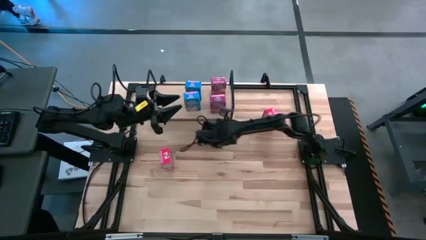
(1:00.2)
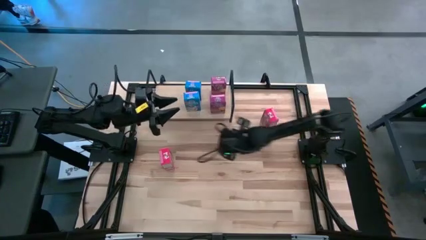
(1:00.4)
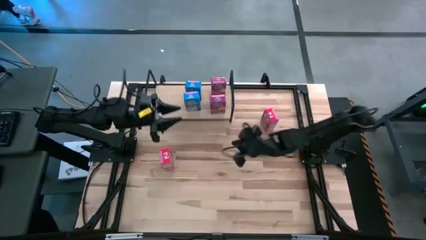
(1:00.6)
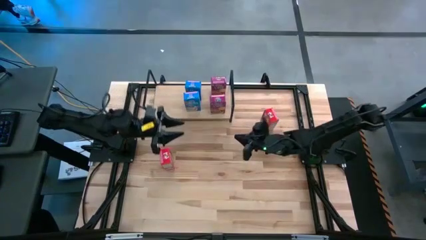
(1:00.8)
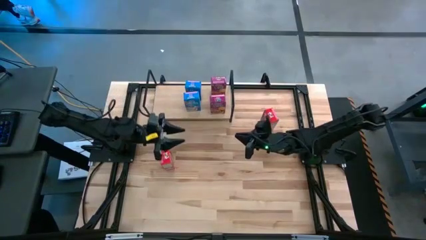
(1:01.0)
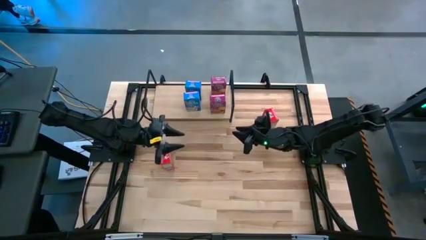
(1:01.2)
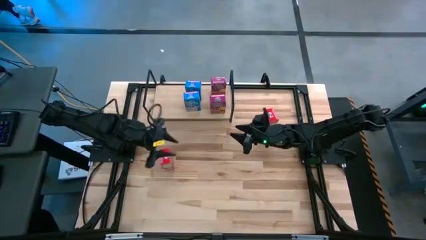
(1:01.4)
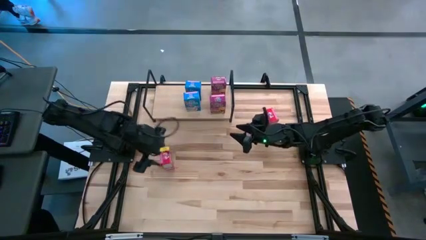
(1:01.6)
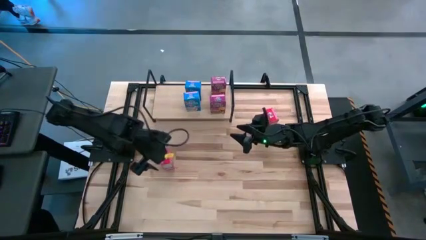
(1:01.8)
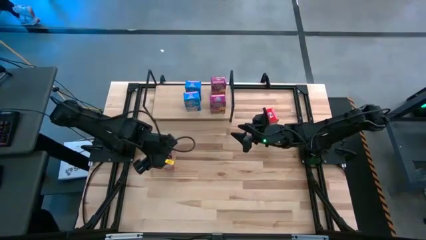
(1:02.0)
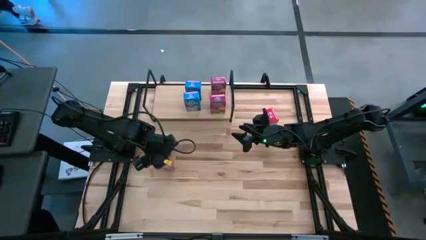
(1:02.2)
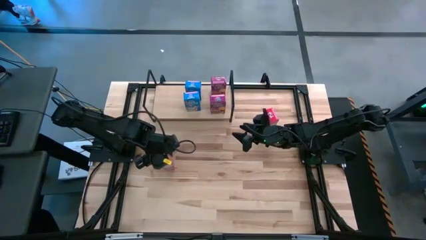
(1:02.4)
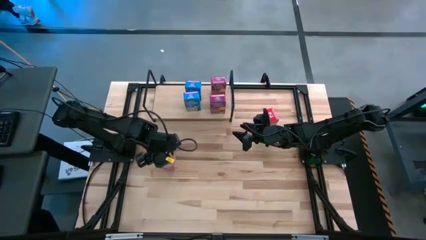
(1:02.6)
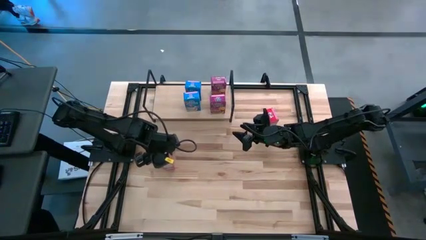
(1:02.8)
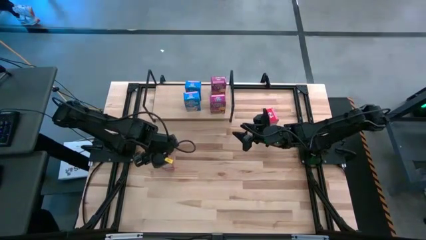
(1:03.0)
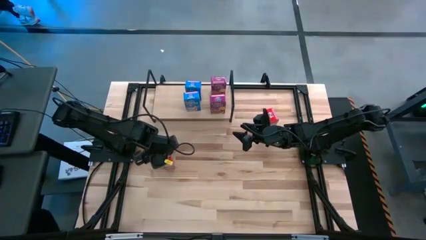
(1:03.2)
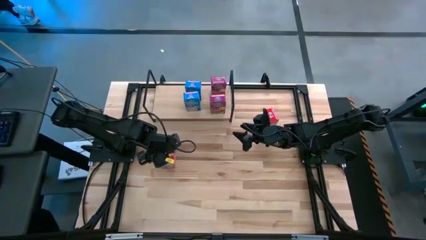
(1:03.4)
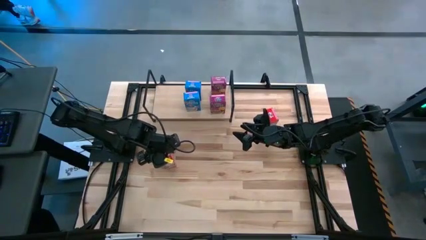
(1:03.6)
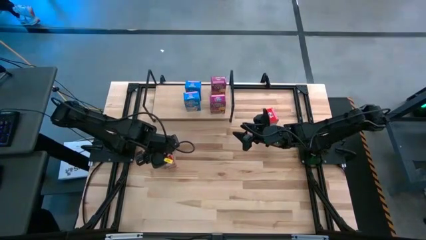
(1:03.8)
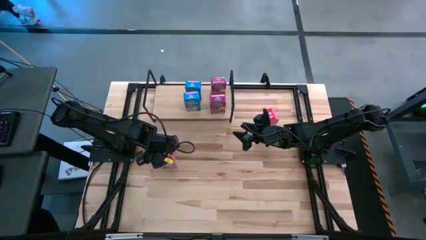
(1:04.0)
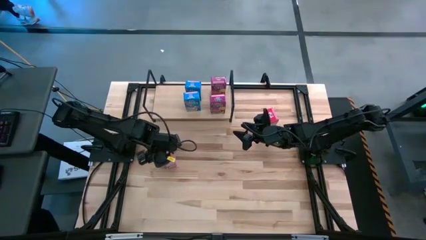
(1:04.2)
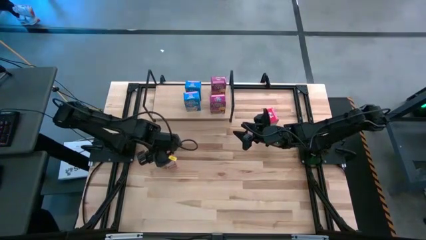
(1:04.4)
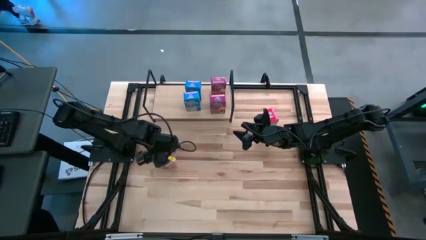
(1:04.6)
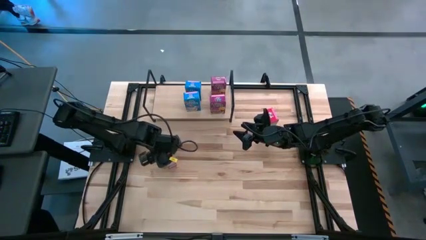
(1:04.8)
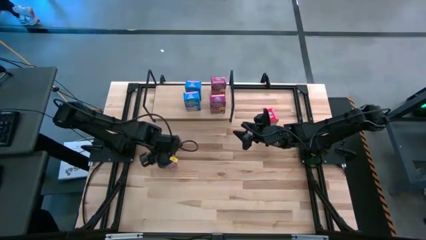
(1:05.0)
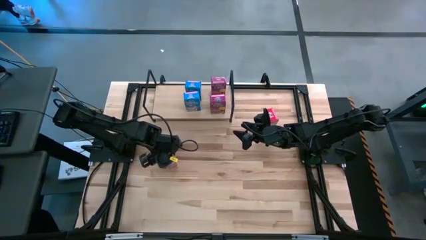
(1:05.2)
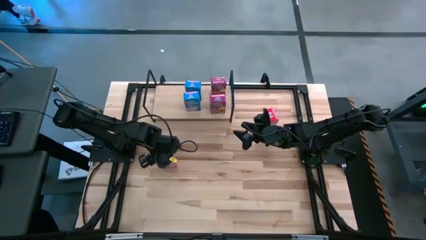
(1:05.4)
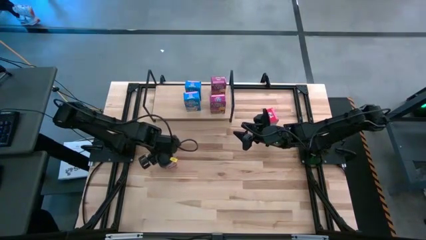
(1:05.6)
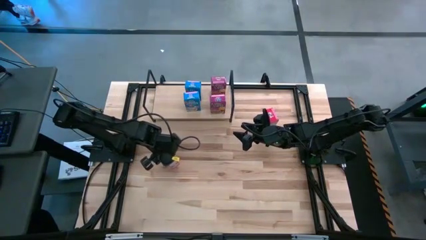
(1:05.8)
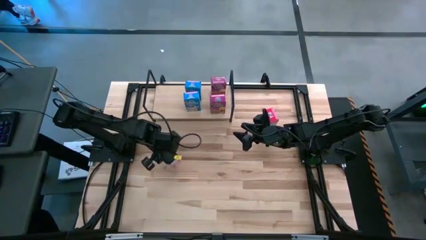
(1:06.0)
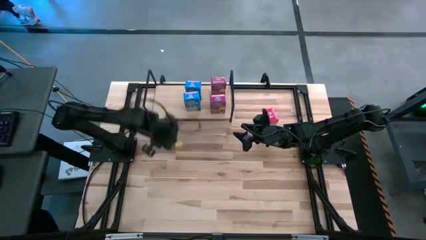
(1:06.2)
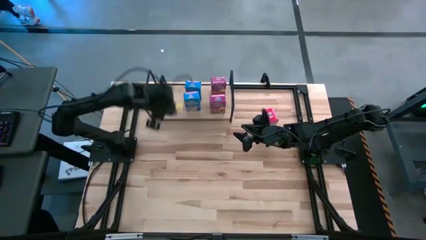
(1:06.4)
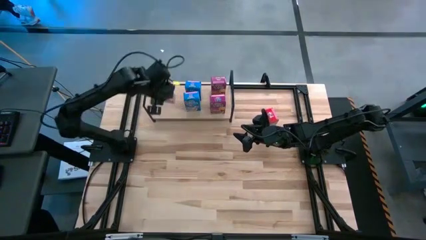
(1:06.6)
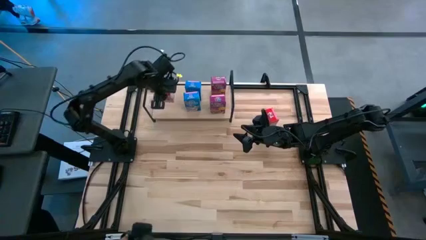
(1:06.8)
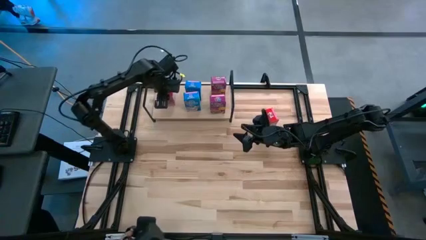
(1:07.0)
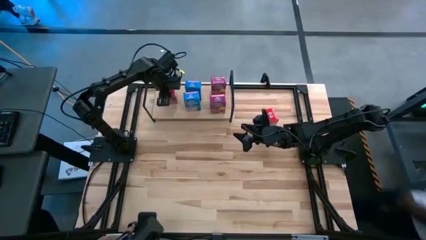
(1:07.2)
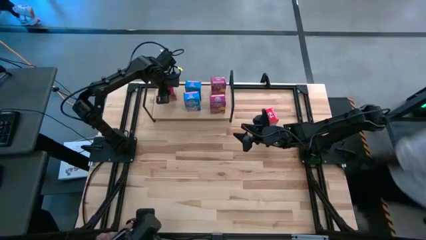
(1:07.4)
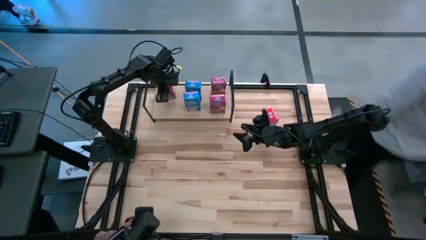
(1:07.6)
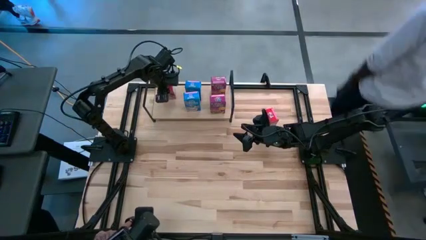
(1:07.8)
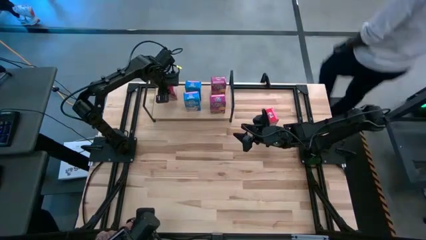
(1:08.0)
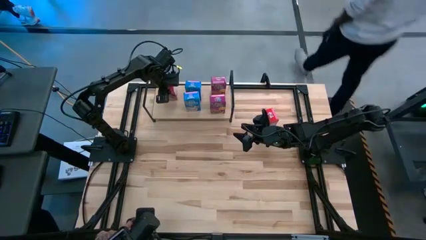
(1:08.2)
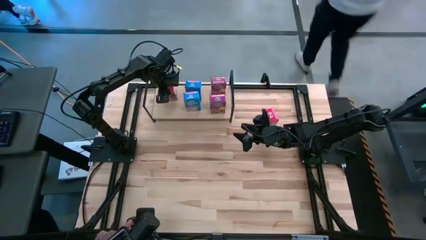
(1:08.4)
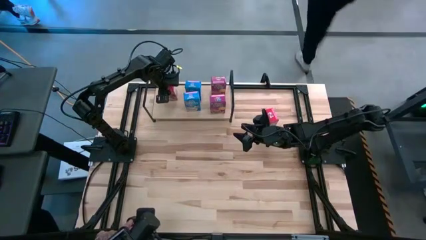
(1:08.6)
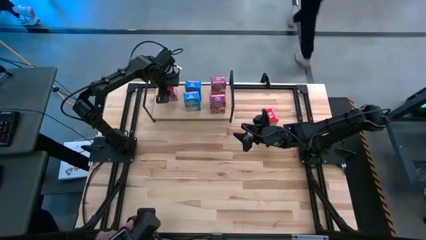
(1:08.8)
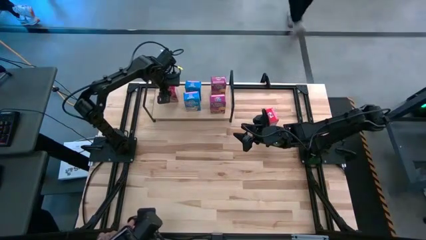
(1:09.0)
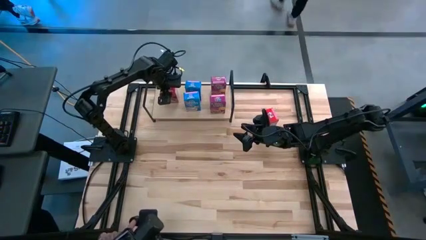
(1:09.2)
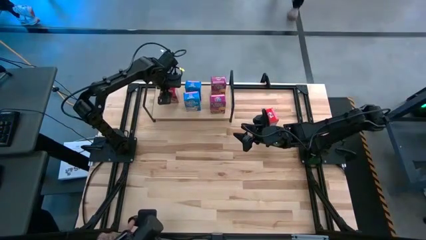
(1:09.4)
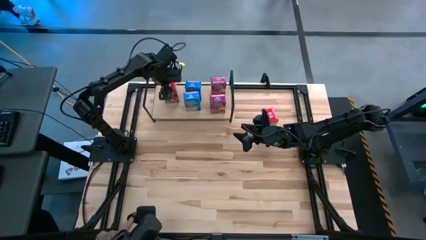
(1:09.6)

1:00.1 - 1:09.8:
Task: Stack cereal on shelf
Put the left red cereal box on the shelf
